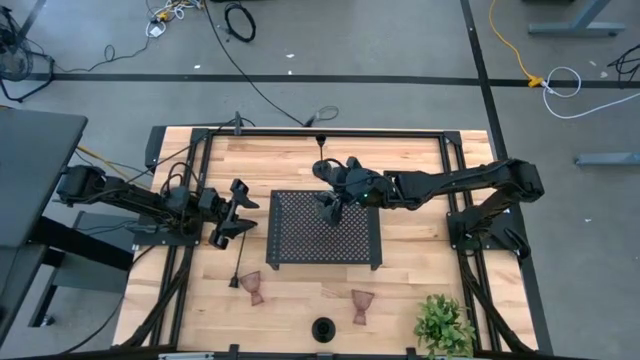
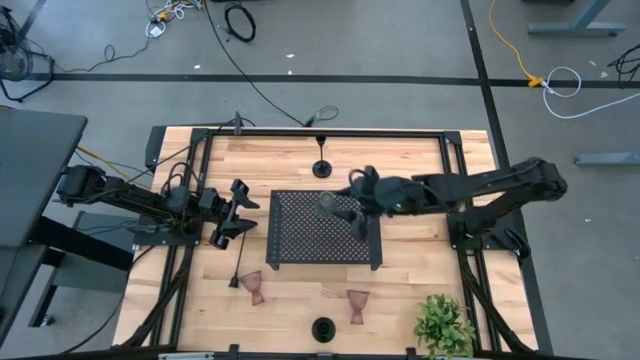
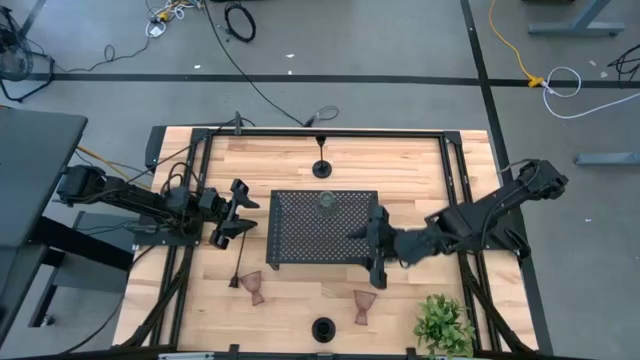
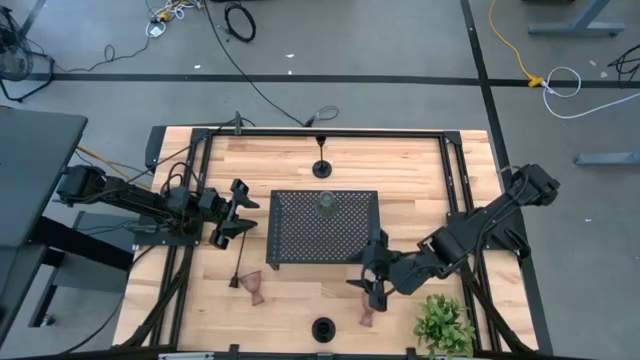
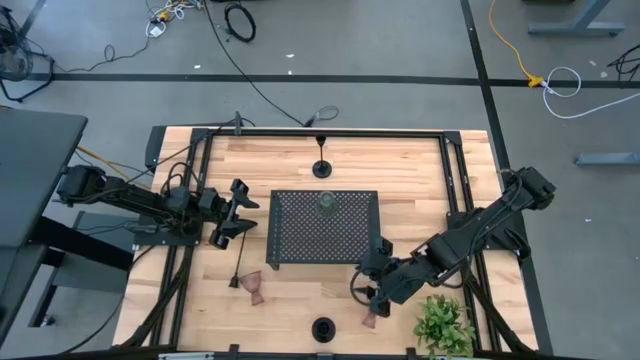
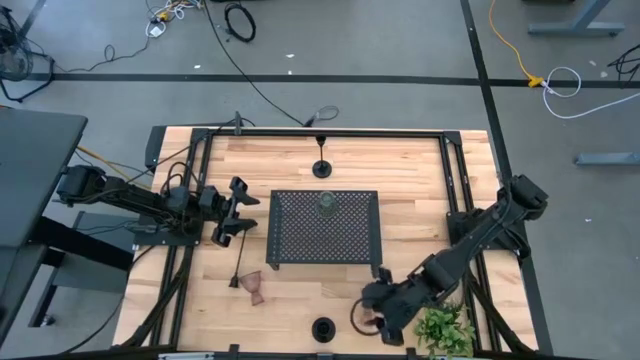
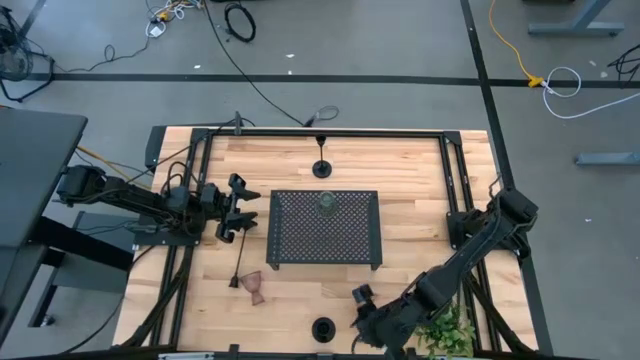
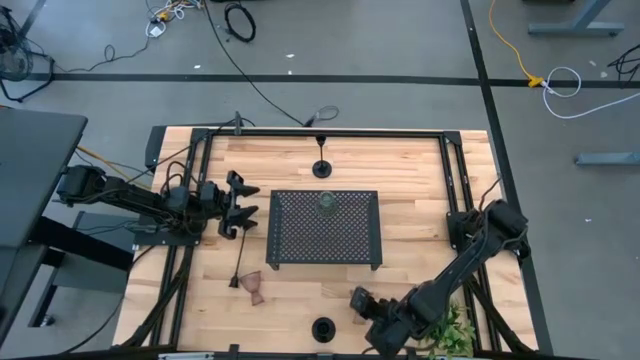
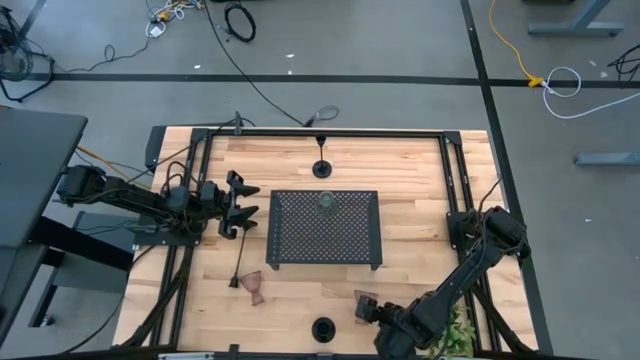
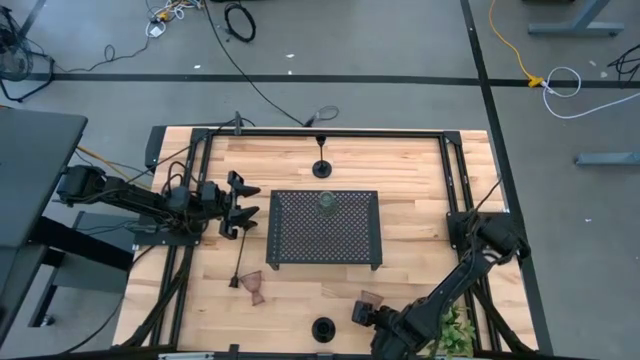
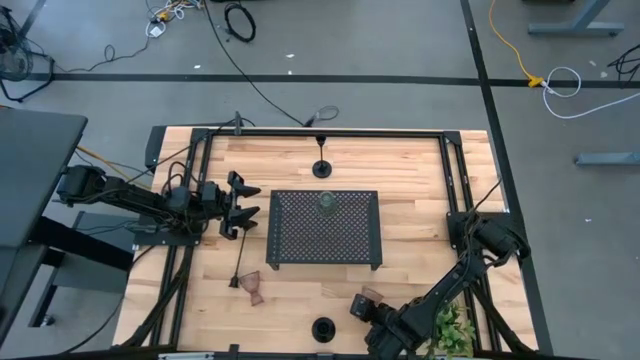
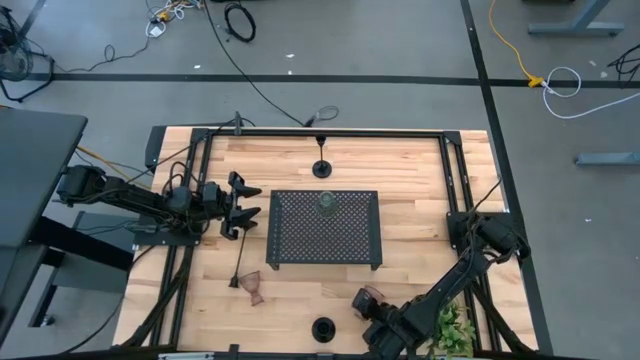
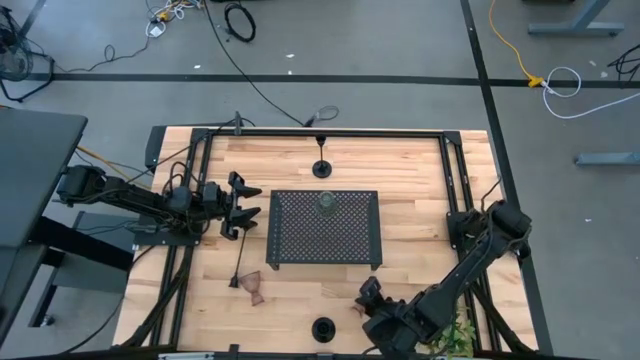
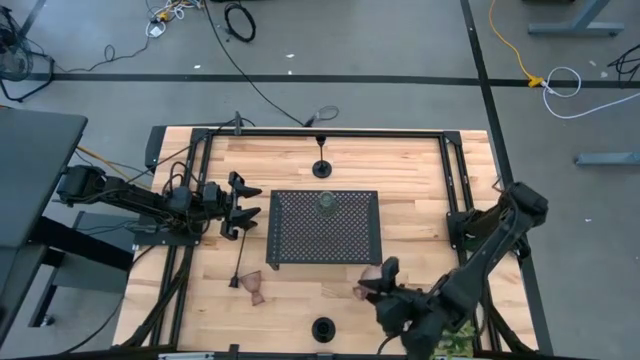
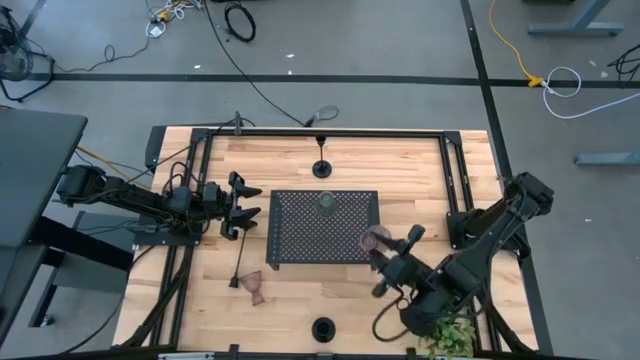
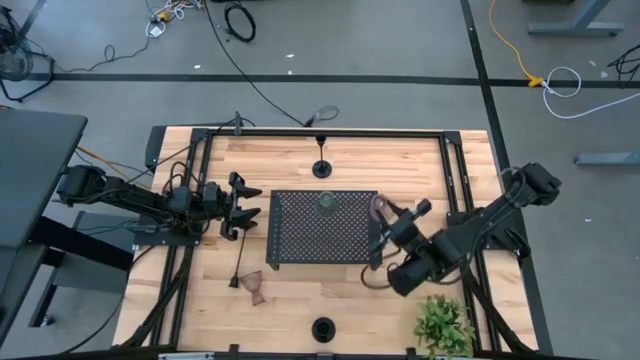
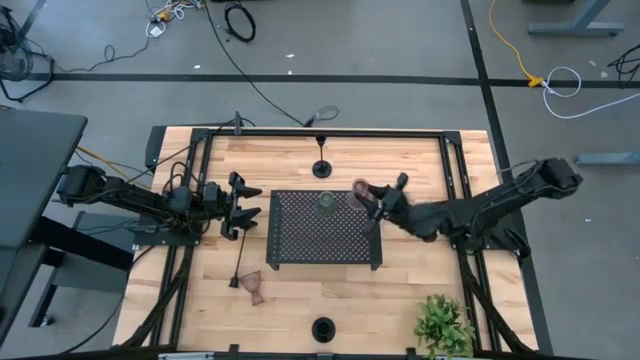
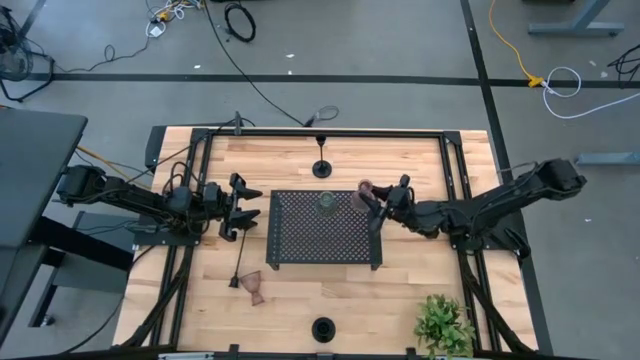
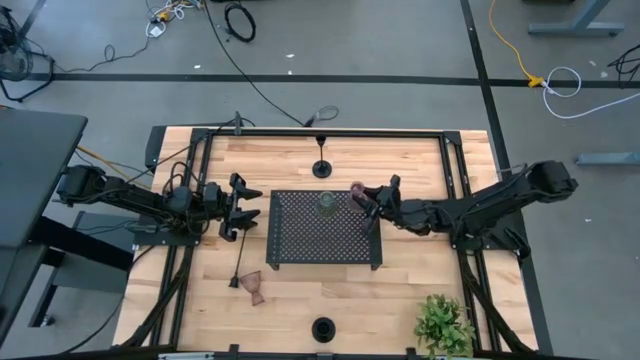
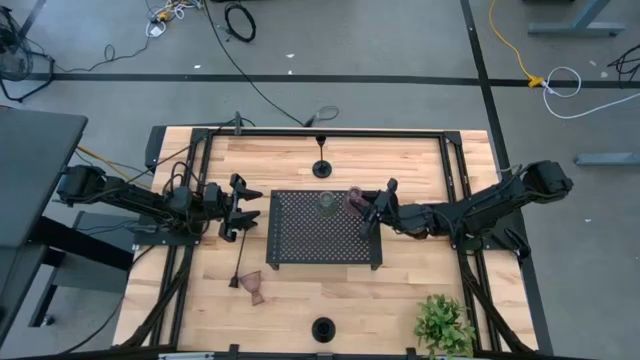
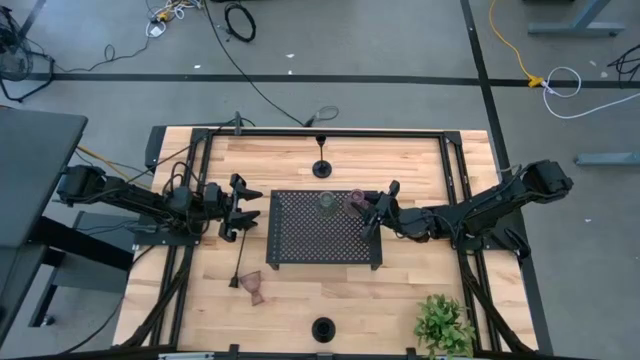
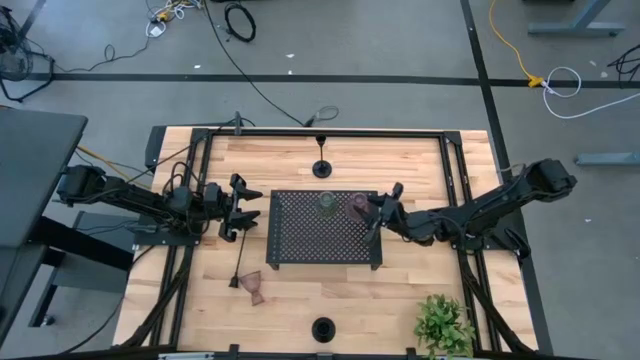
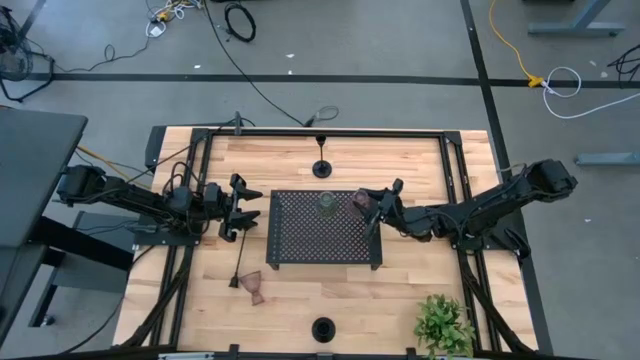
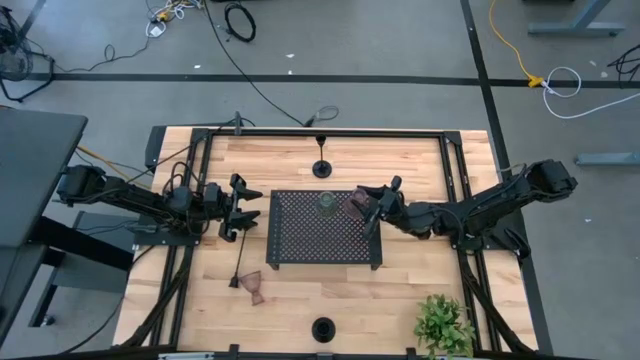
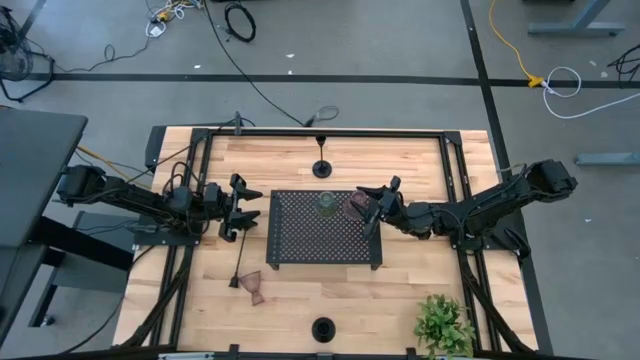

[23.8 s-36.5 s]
Task: Pick & Place candle stick holders
Put the right pink candle holder on the shelf aligned with the candle holder

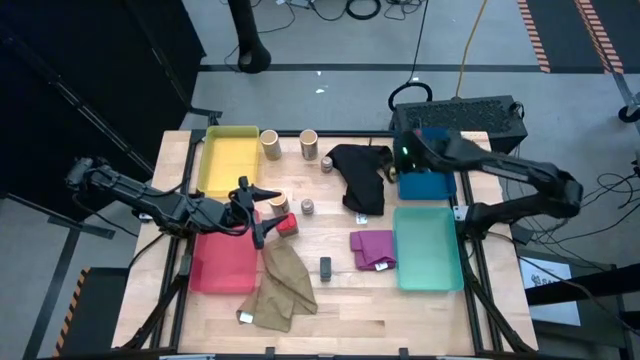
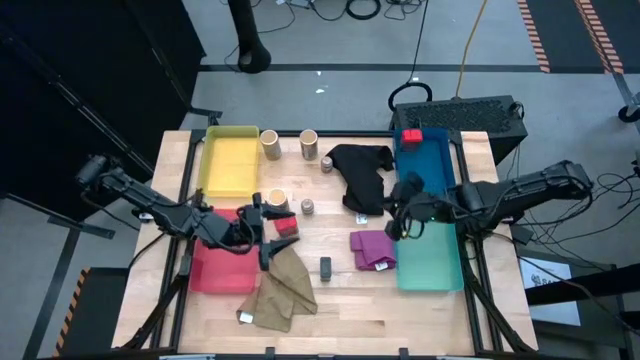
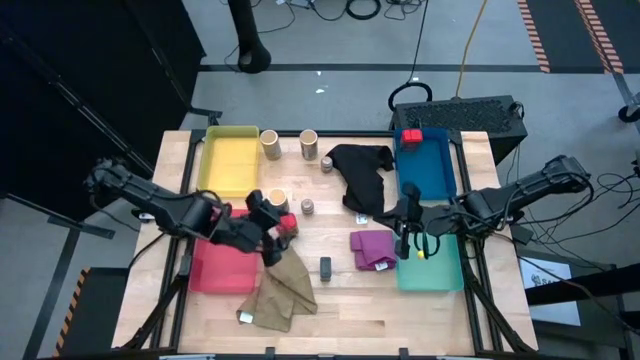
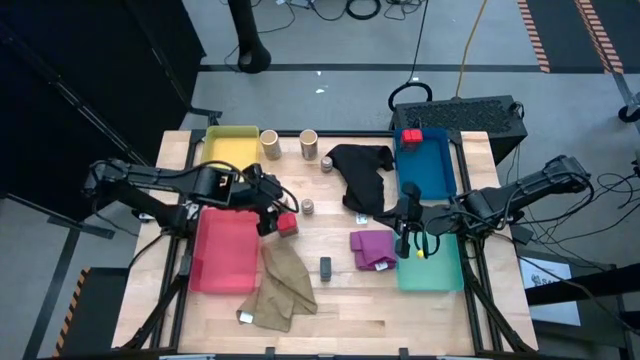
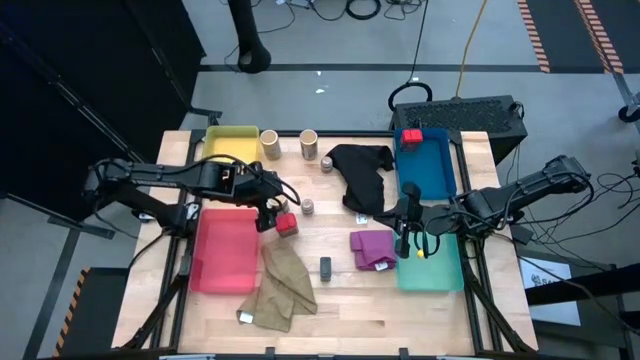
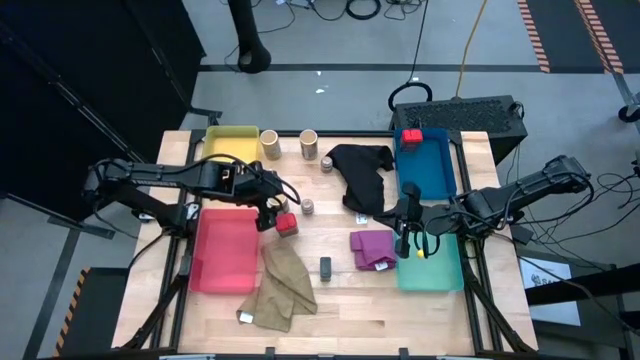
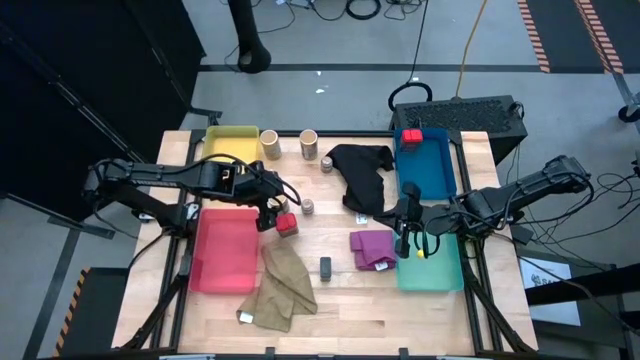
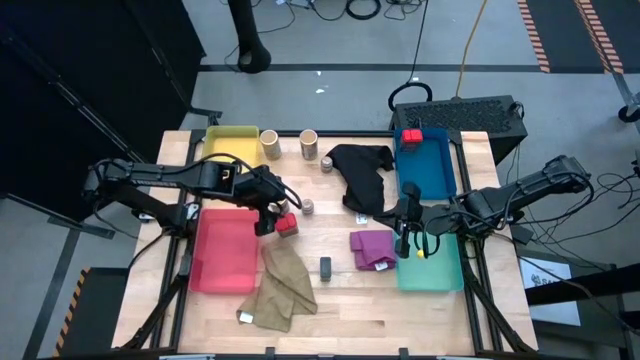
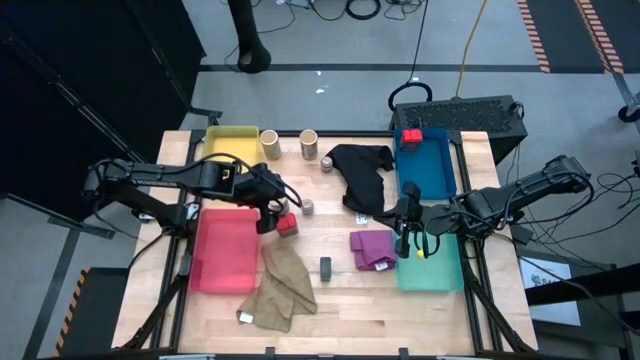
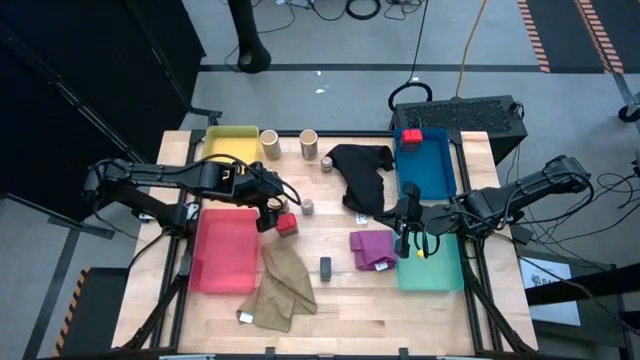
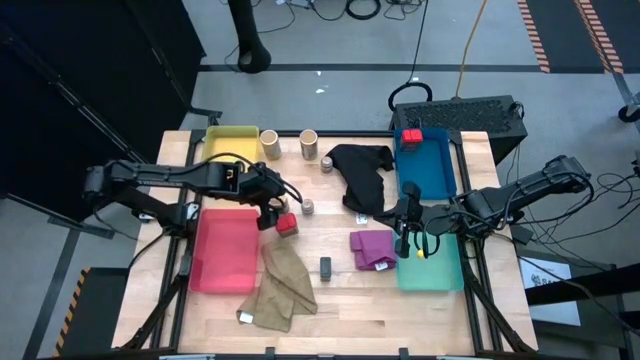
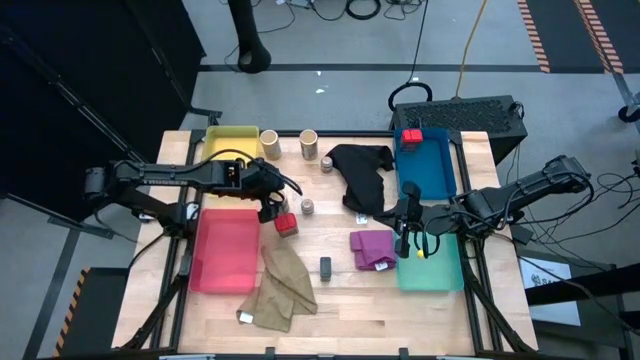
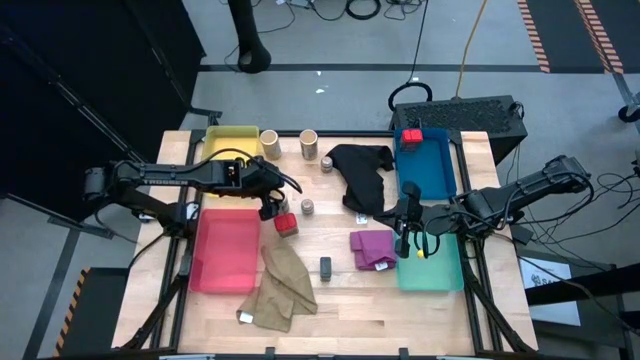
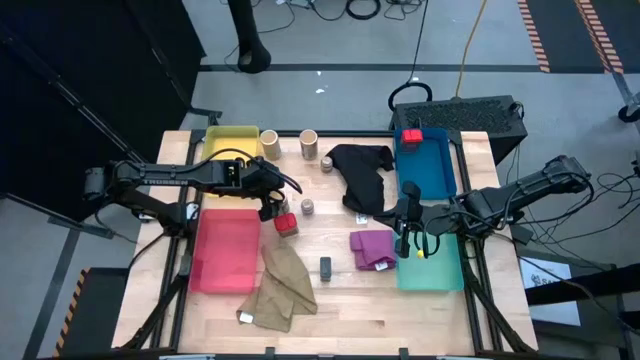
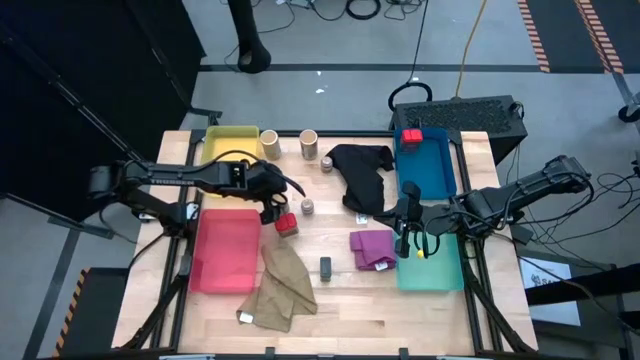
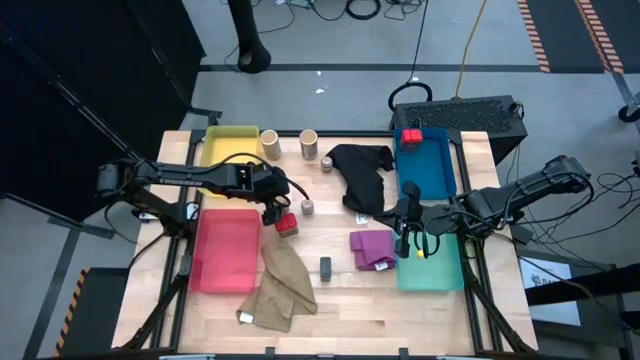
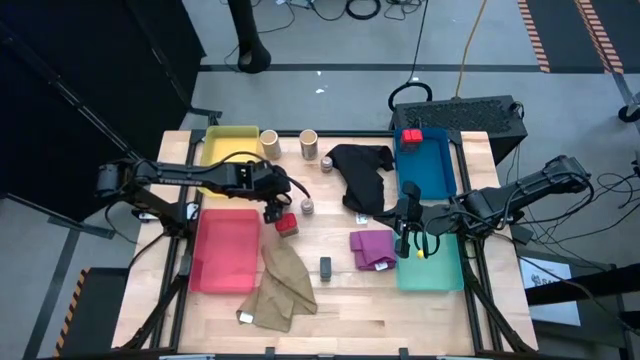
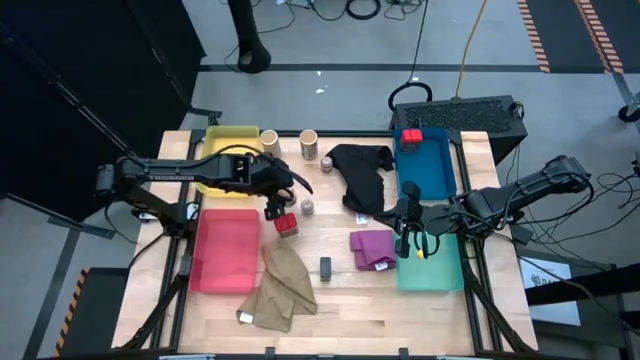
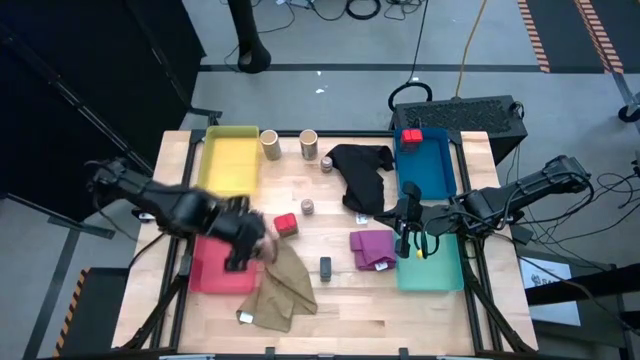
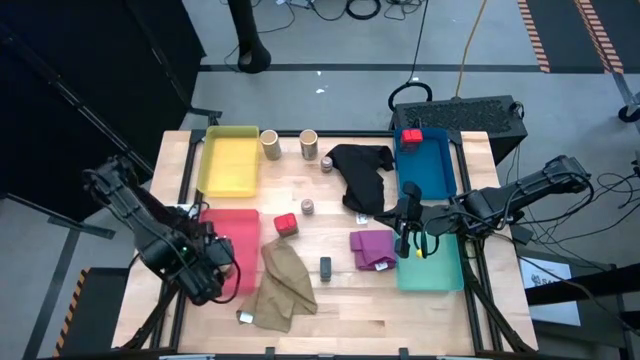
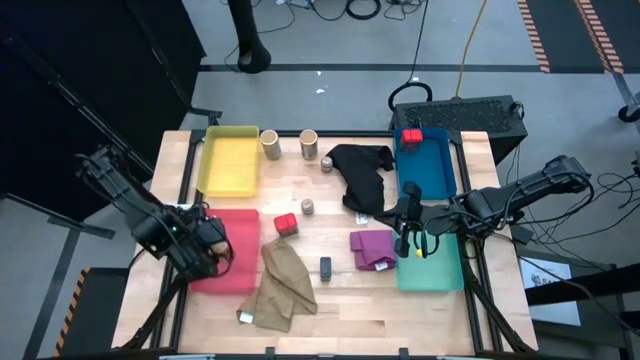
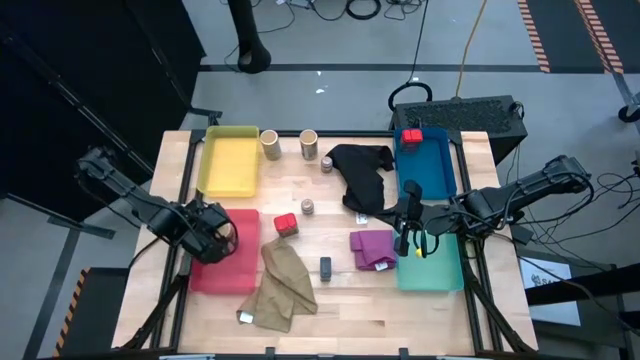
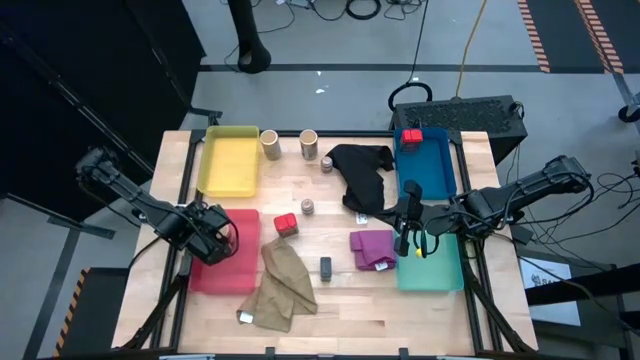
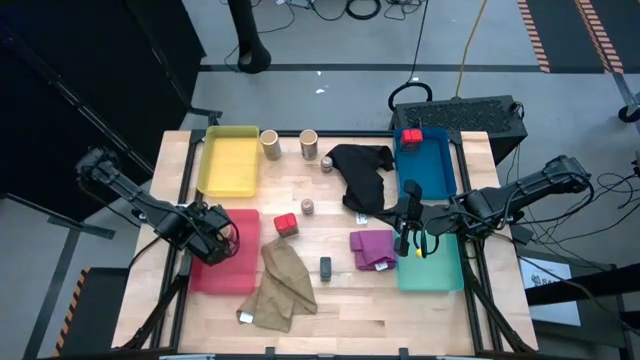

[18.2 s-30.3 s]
Task: Sort spices by type
Put the bottom gold seasoning bottle into the red bin
